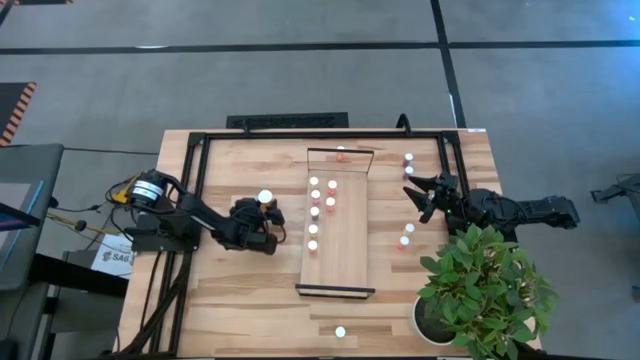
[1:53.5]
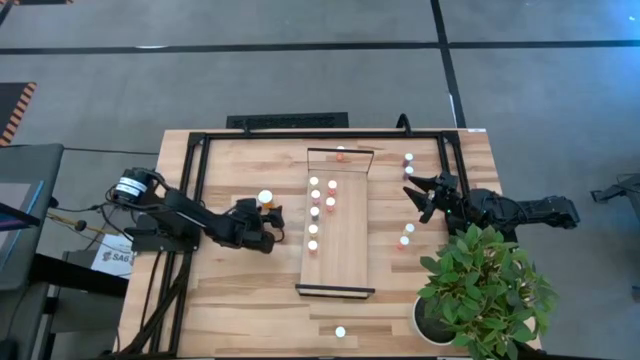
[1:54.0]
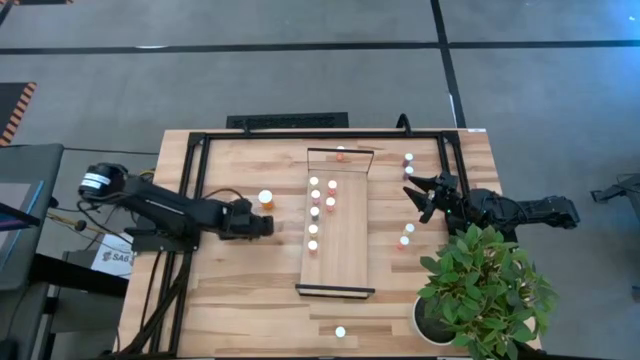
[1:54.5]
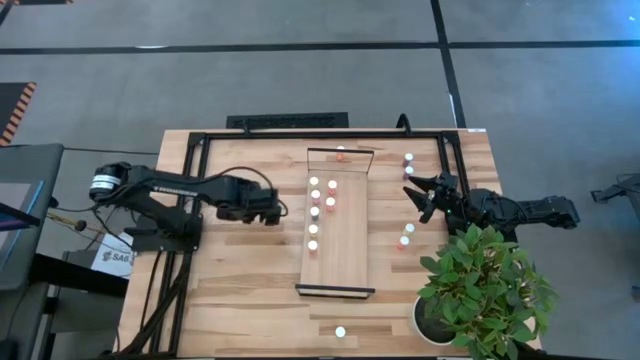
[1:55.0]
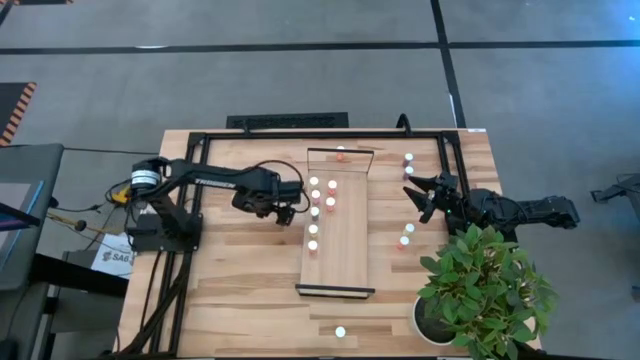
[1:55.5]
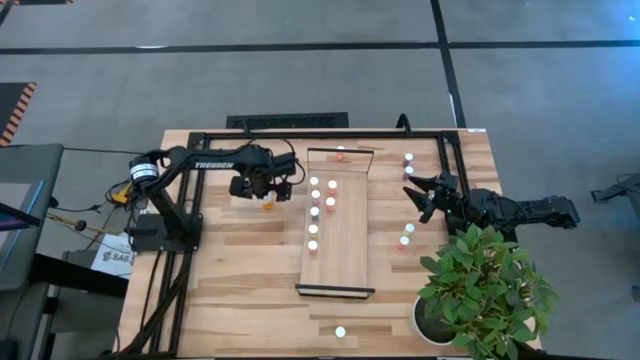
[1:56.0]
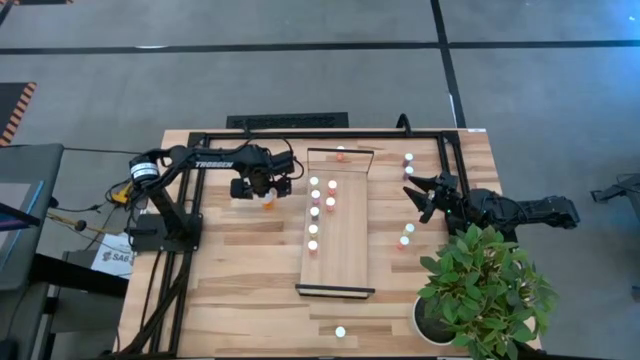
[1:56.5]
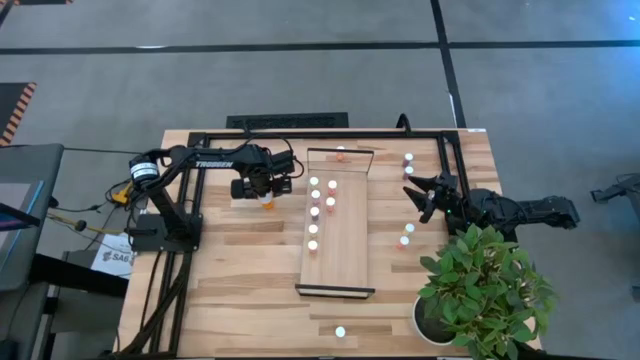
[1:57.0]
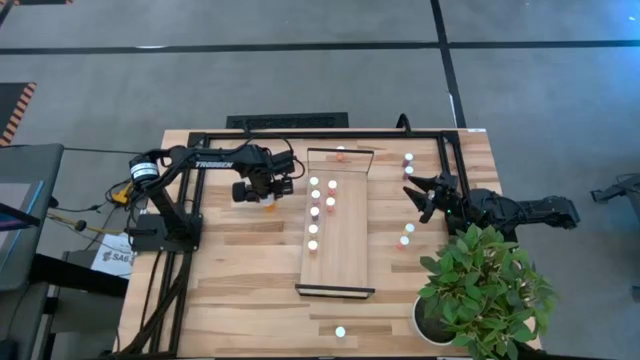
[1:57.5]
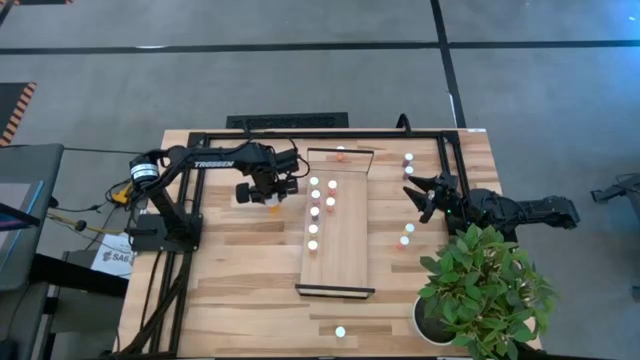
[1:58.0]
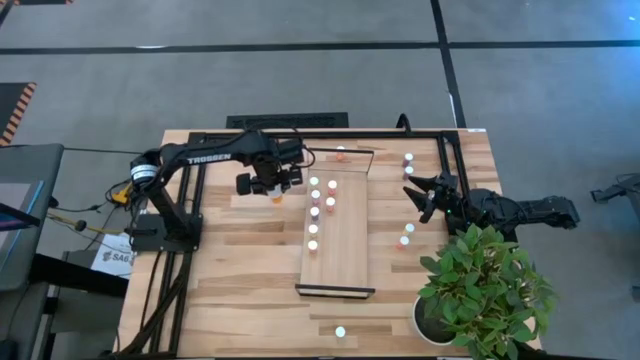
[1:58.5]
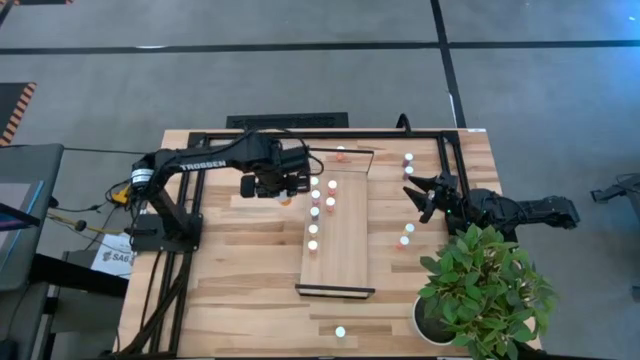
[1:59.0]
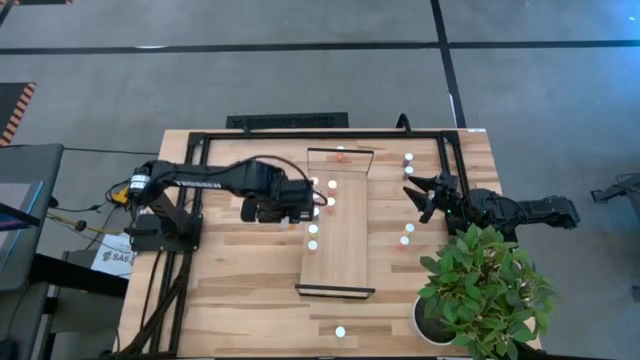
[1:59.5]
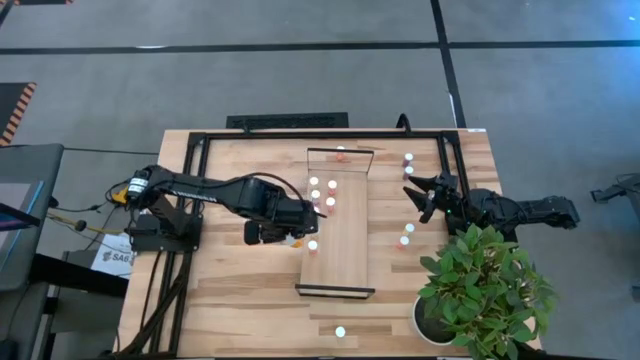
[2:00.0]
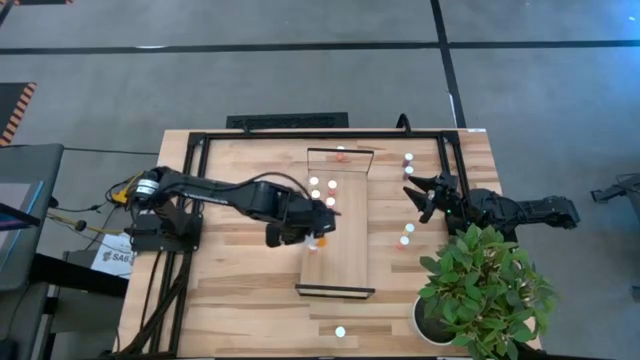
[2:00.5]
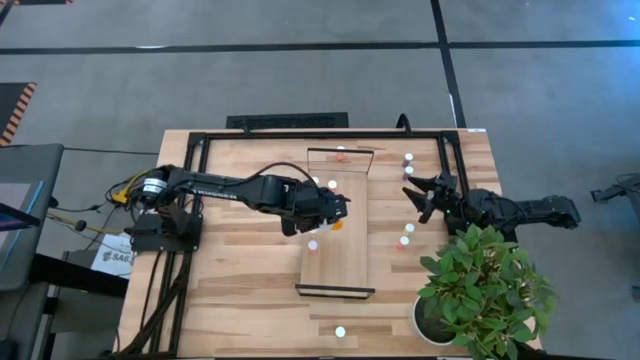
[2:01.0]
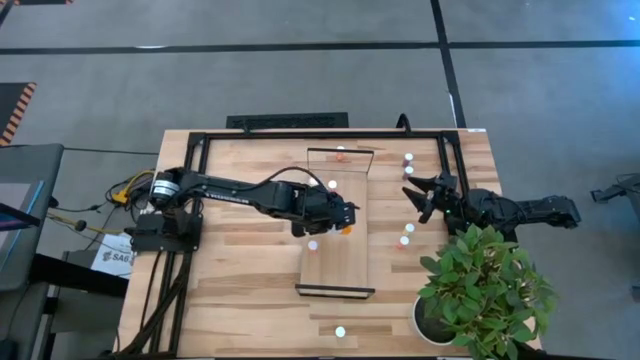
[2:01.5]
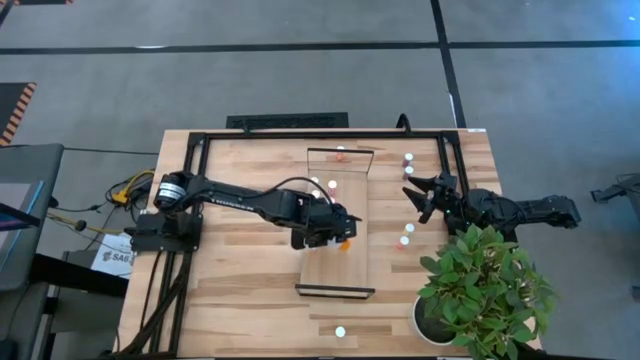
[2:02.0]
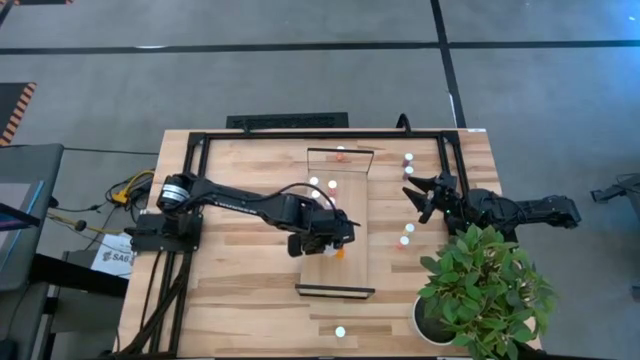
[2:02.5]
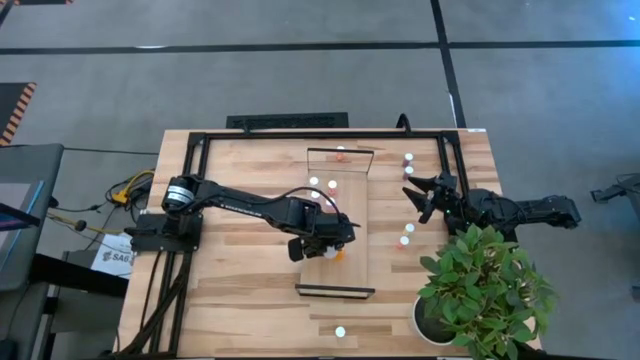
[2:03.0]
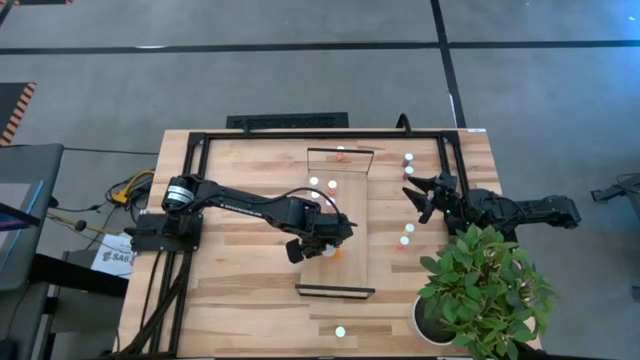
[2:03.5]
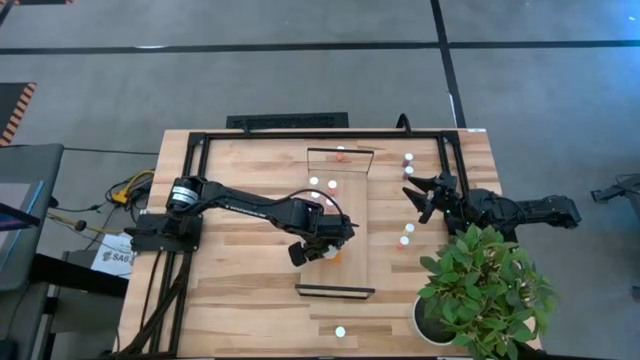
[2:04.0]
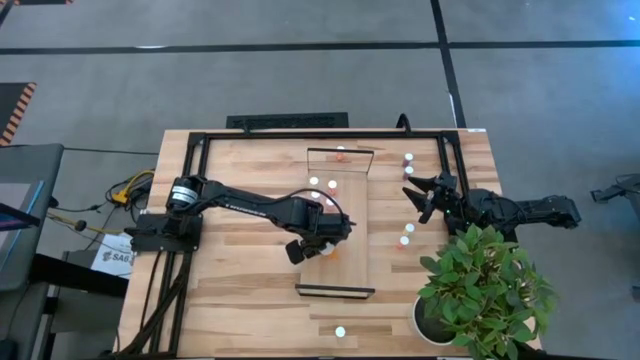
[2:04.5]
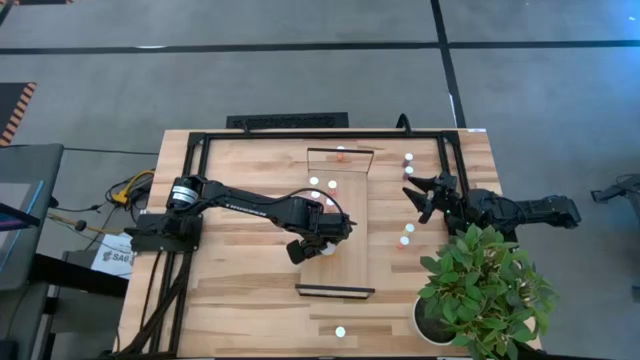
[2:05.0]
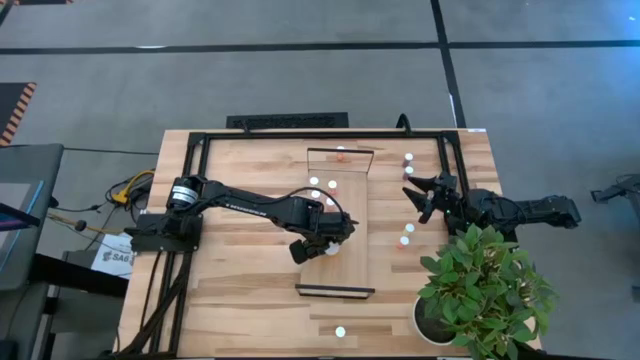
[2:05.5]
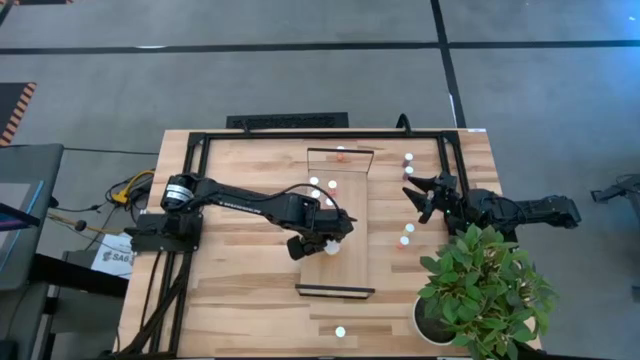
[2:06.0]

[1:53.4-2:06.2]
Task: Pick and place medicine bottles onto shelf by color
Put the orange pill bottle on the shelf

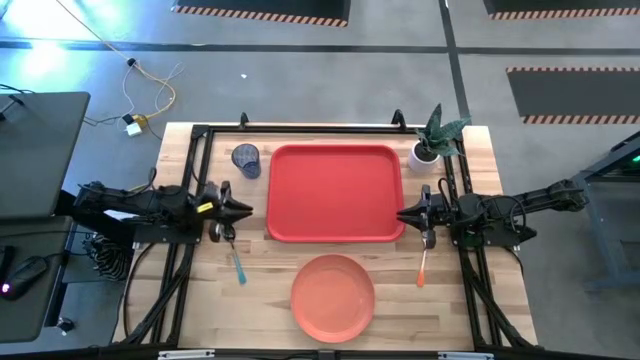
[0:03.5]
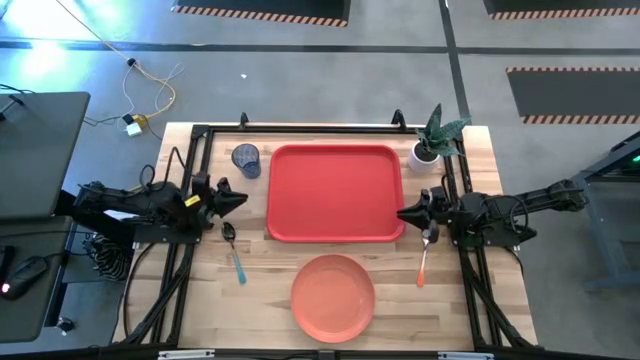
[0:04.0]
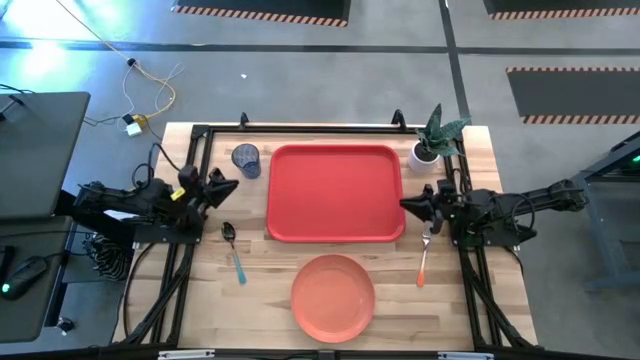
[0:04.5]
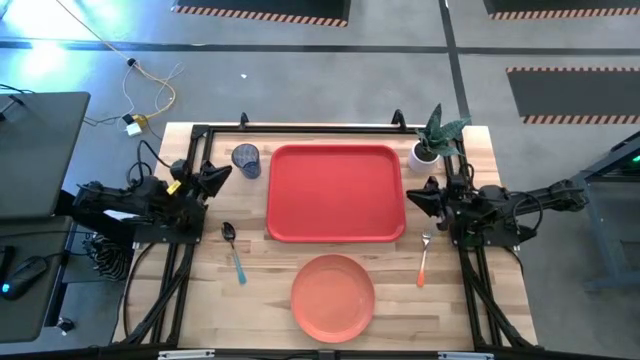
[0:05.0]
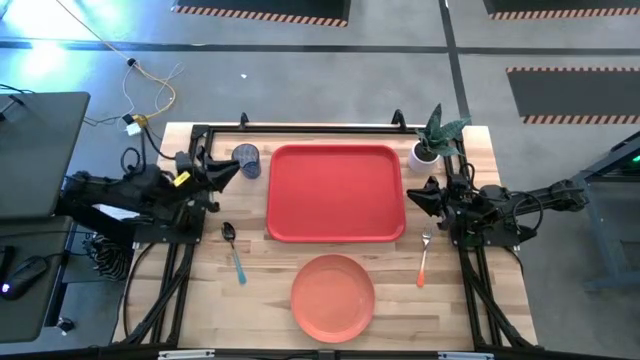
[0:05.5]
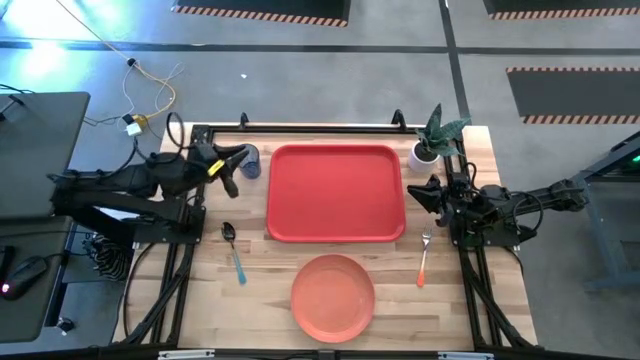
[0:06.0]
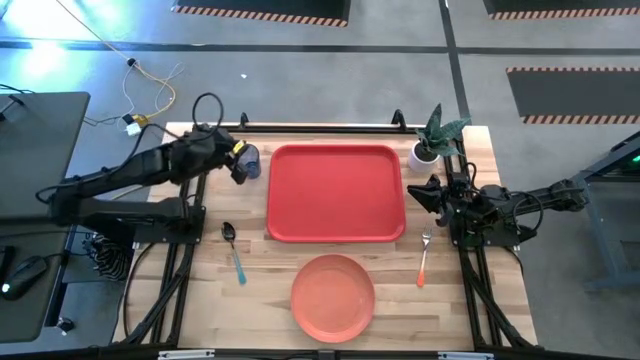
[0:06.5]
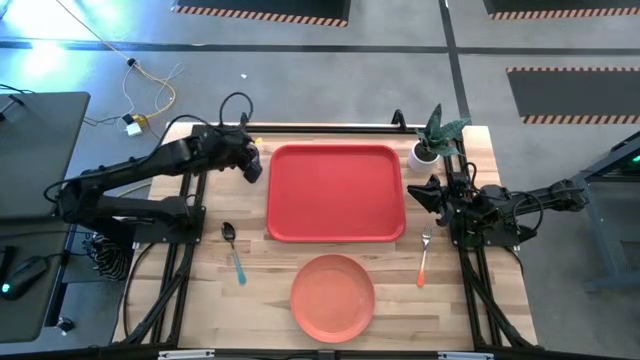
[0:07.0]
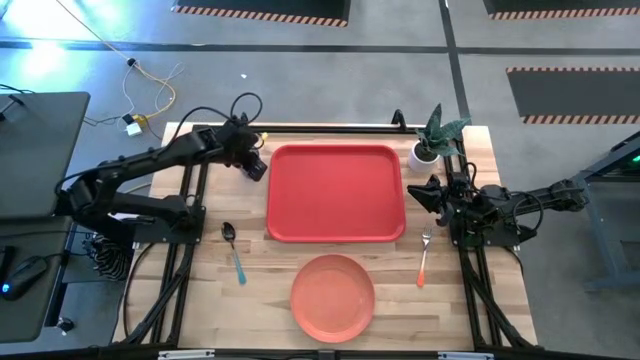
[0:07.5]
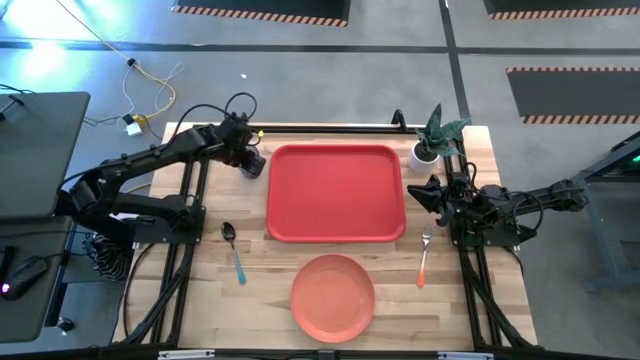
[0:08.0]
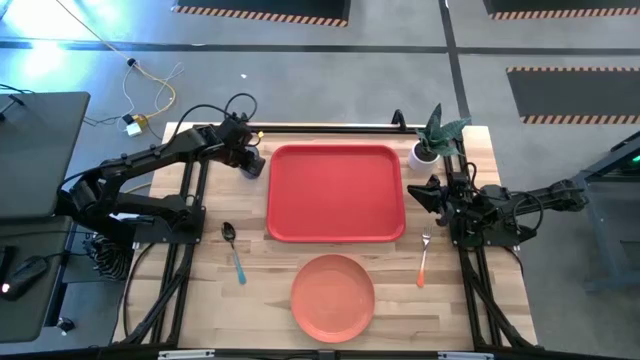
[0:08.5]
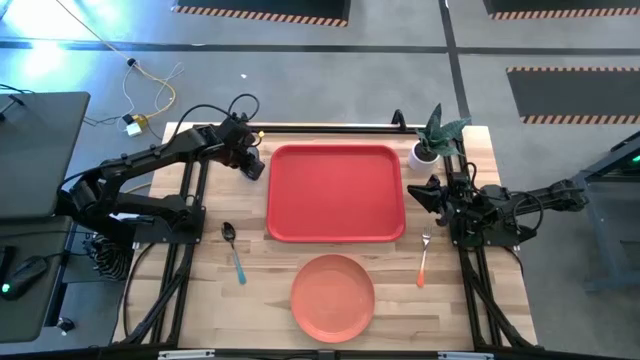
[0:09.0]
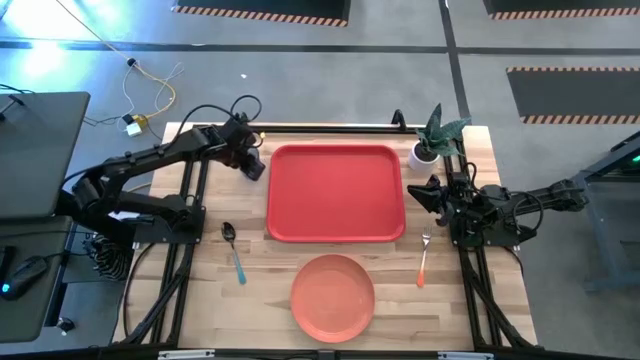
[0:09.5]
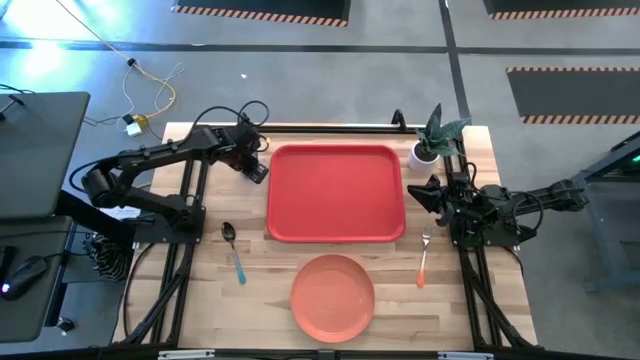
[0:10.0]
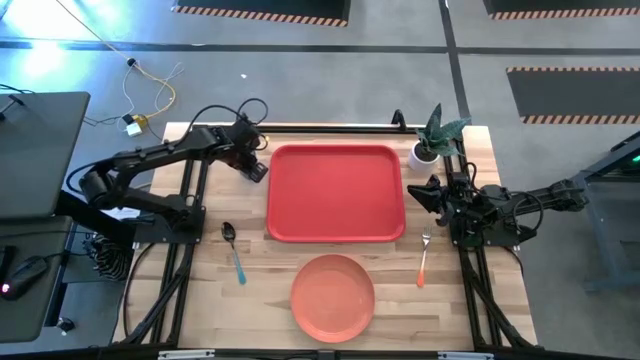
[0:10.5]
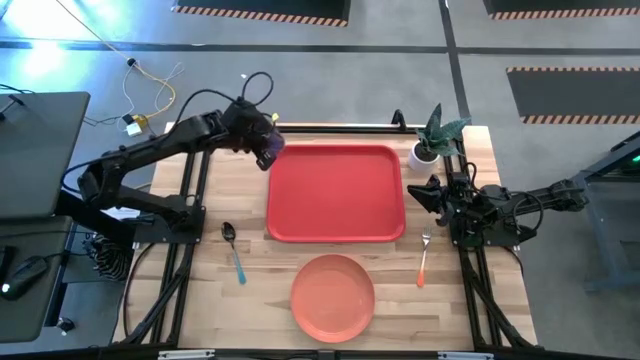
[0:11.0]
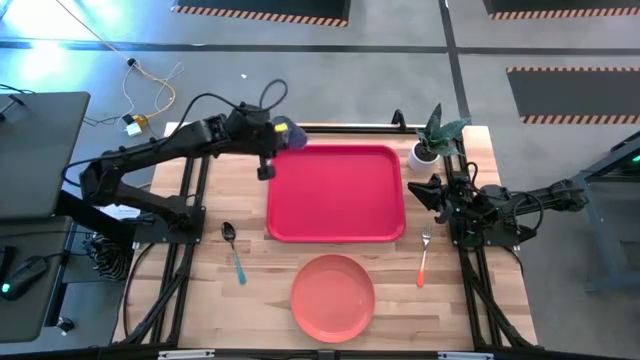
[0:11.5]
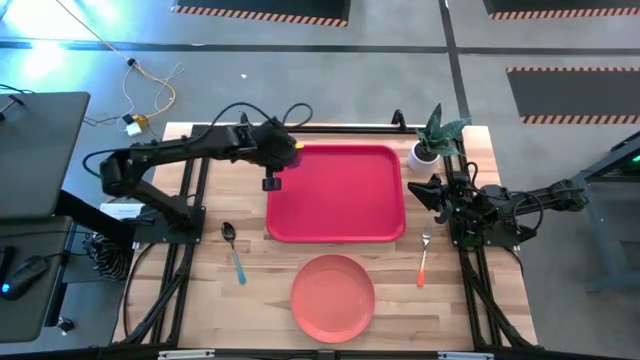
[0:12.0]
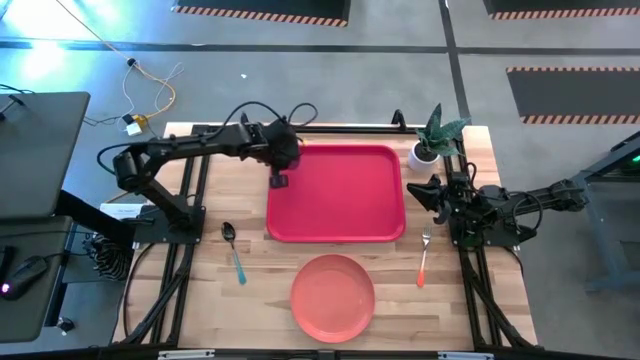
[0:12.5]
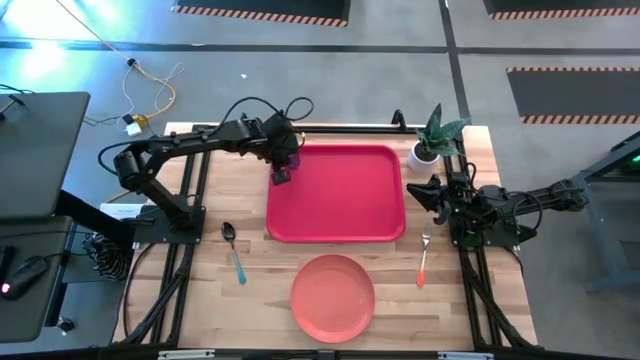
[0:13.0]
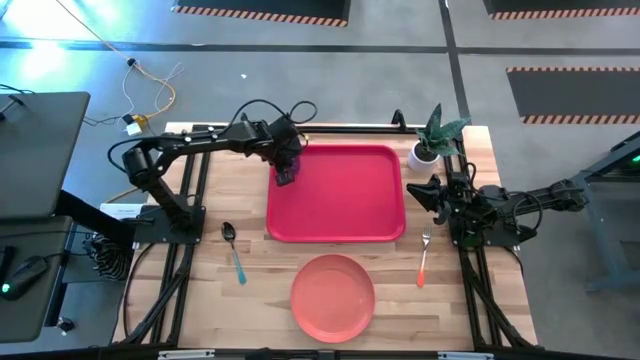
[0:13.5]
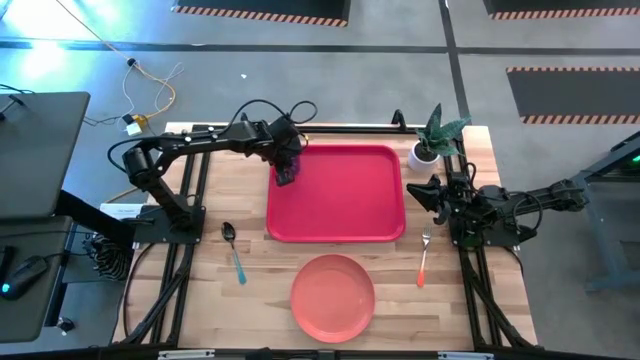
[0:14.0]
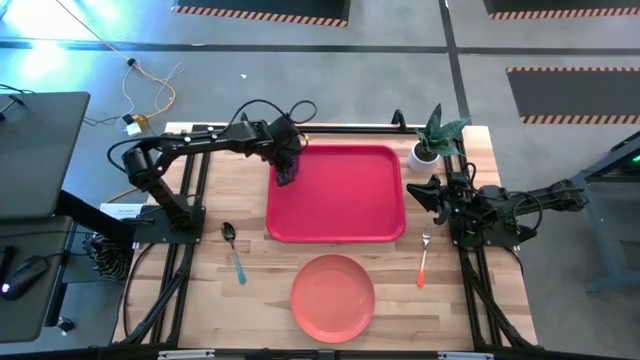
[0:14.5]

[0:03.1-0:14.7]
Task: Pick and place plate/cup/fork/spoon on tray
Put the blue cup on the red serving tray
